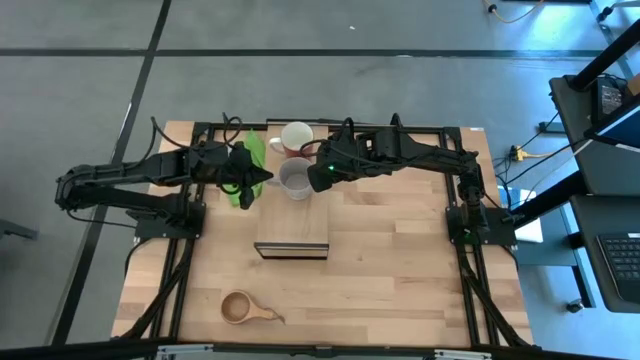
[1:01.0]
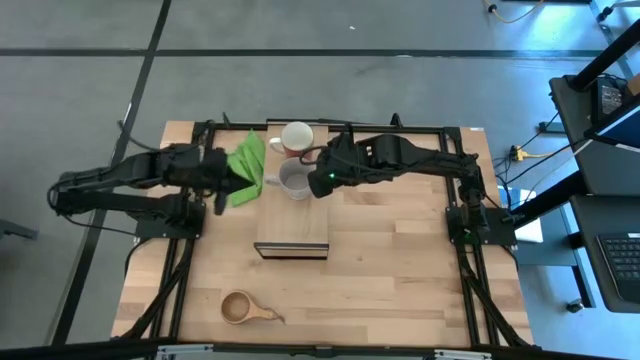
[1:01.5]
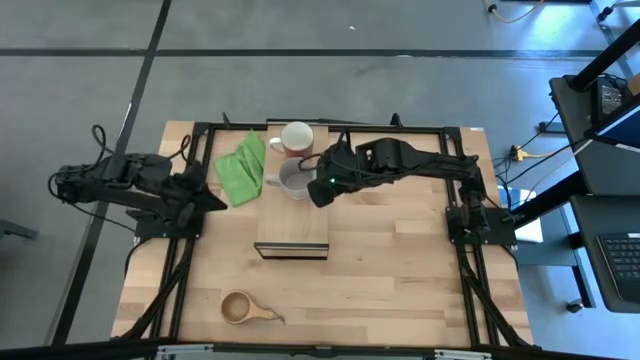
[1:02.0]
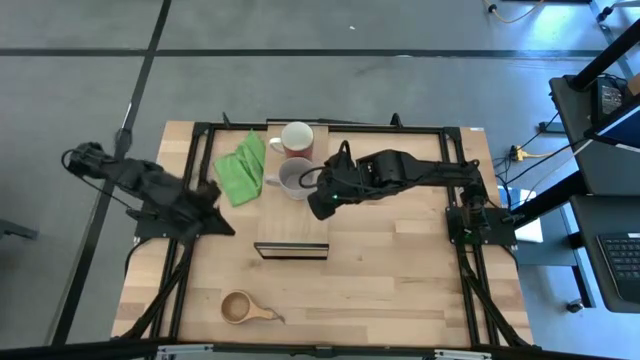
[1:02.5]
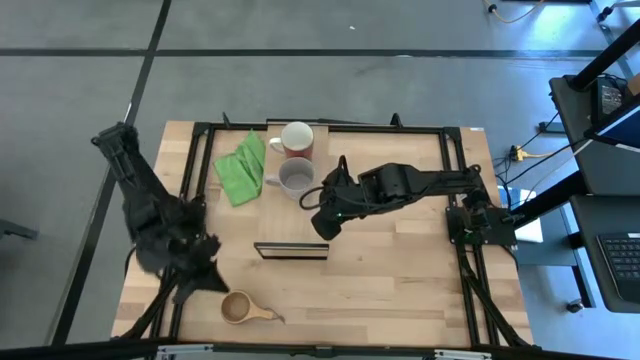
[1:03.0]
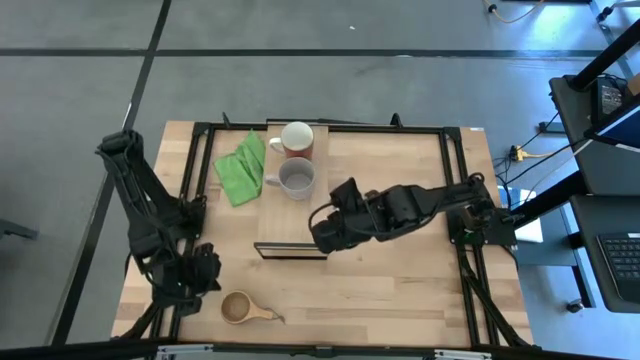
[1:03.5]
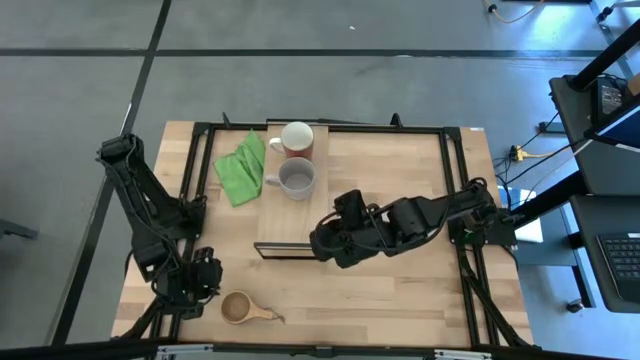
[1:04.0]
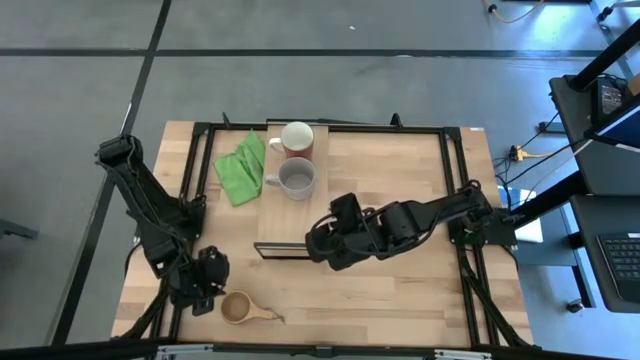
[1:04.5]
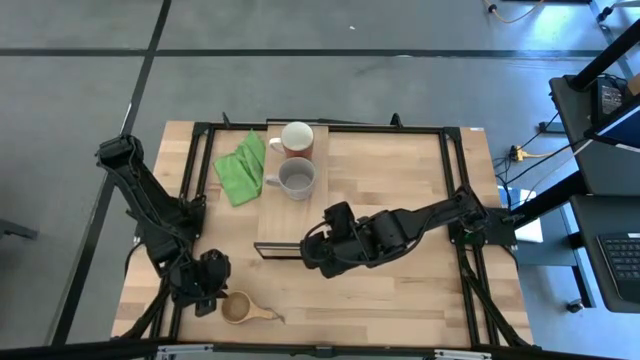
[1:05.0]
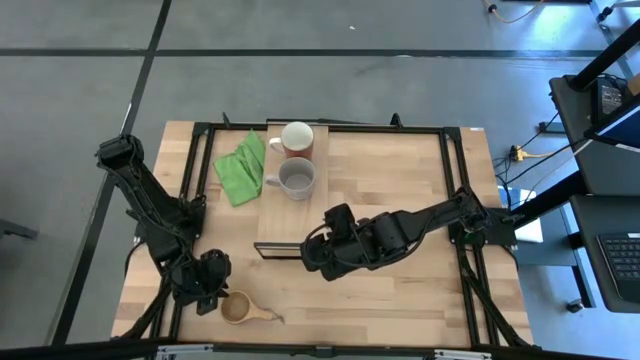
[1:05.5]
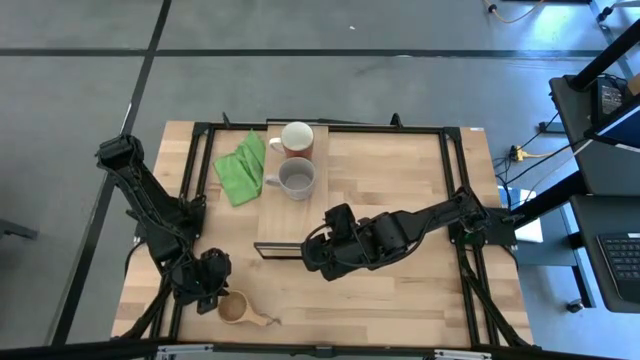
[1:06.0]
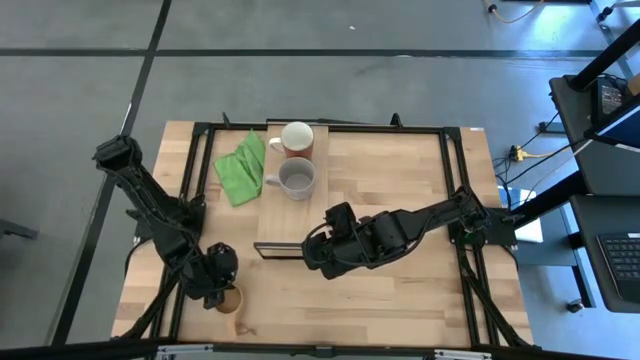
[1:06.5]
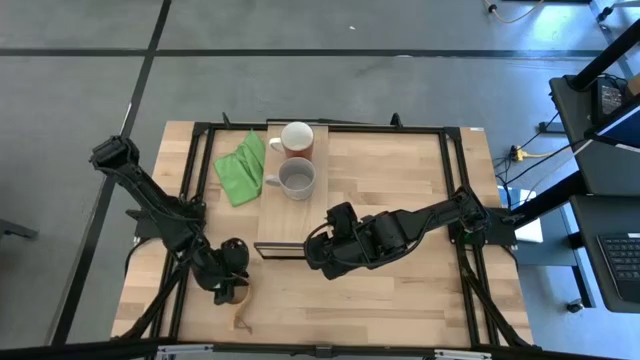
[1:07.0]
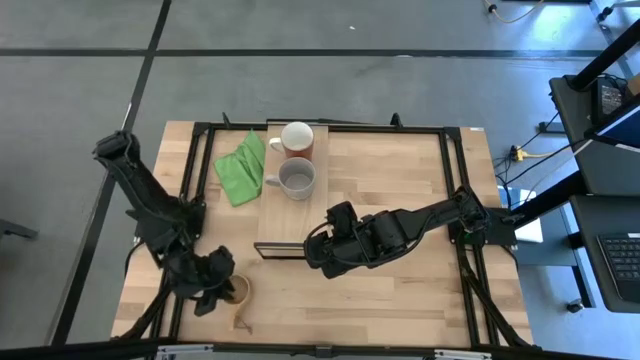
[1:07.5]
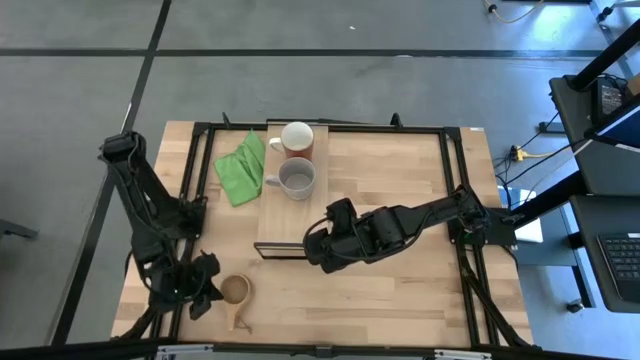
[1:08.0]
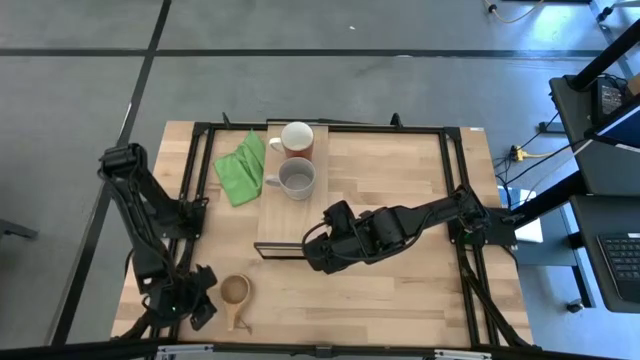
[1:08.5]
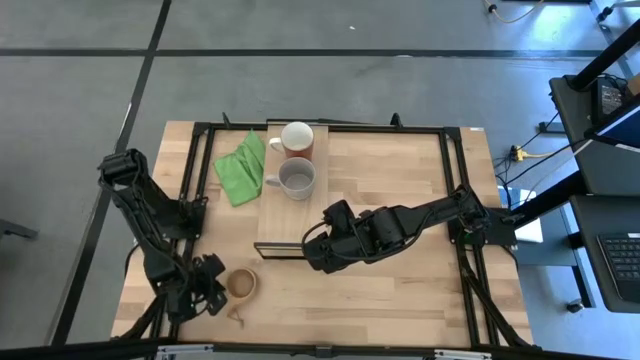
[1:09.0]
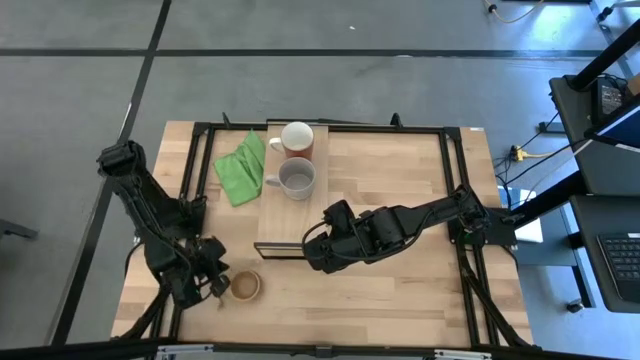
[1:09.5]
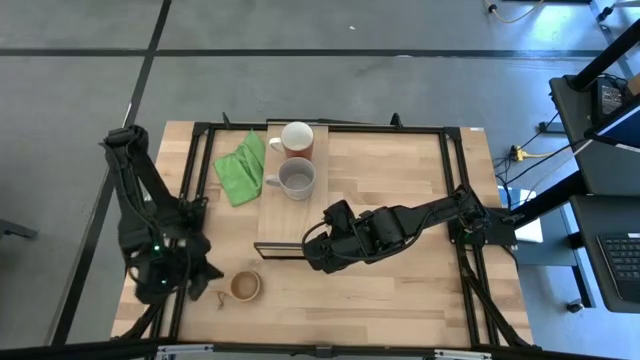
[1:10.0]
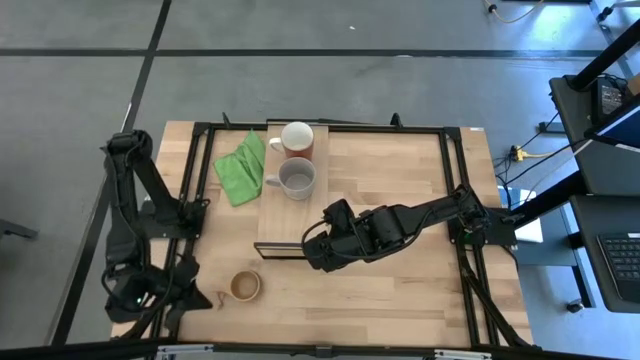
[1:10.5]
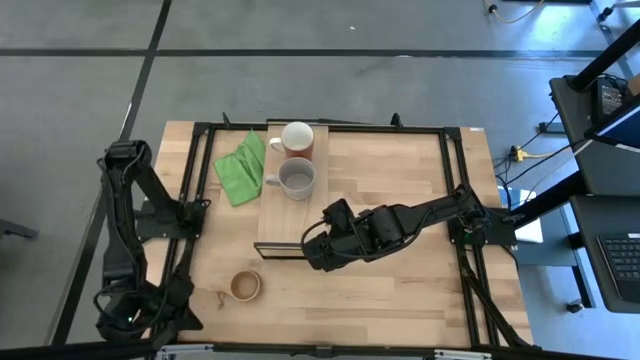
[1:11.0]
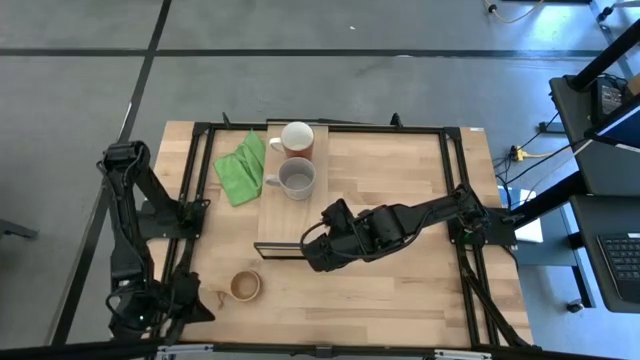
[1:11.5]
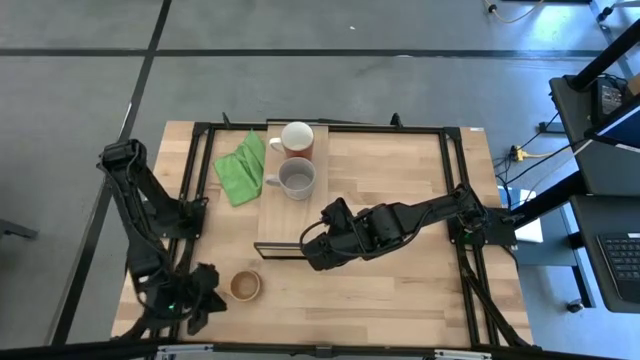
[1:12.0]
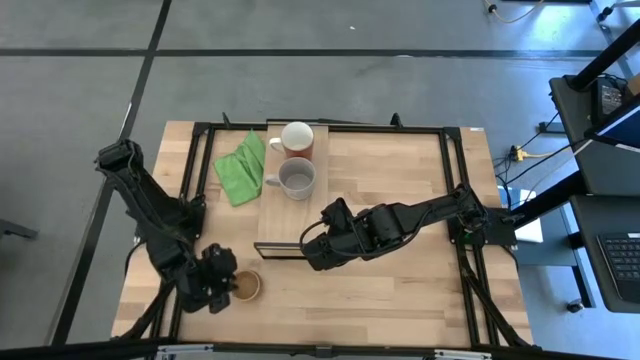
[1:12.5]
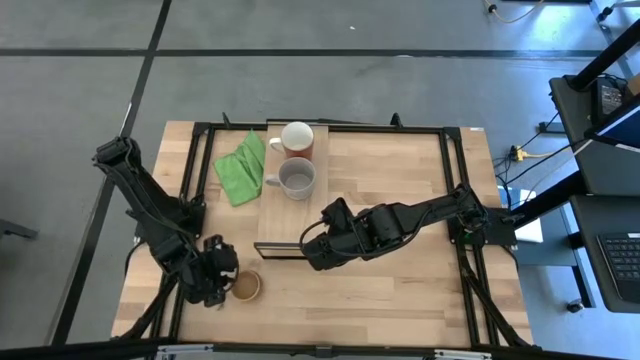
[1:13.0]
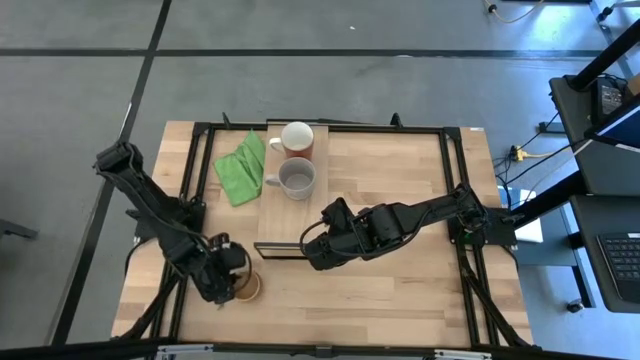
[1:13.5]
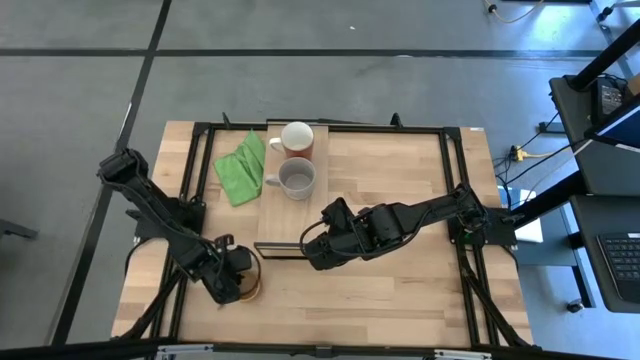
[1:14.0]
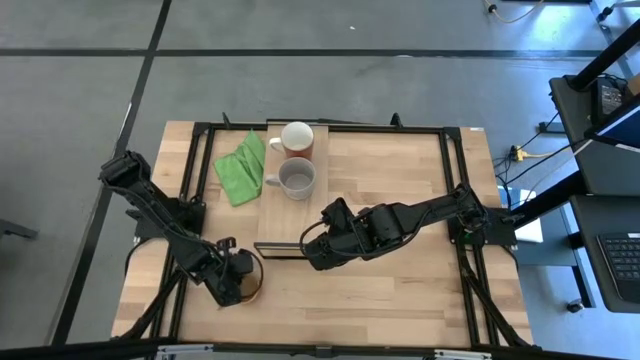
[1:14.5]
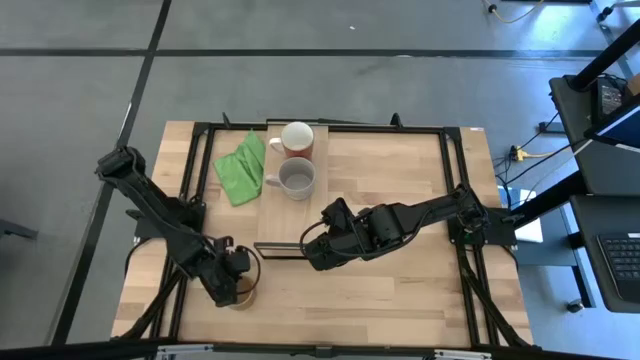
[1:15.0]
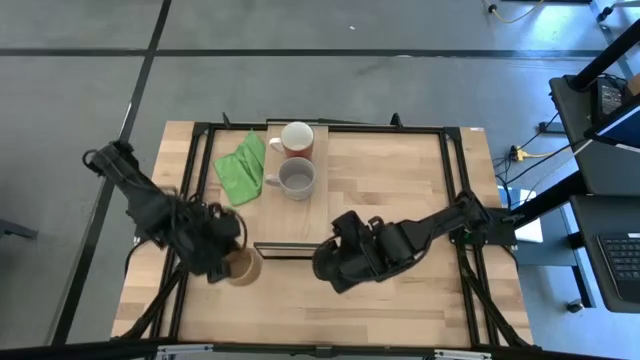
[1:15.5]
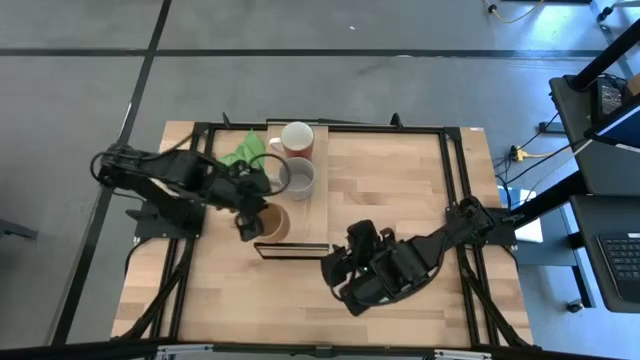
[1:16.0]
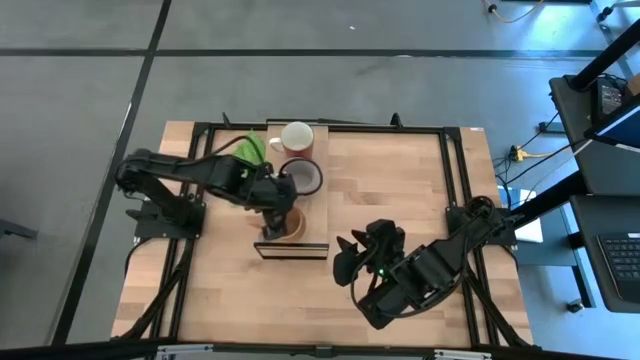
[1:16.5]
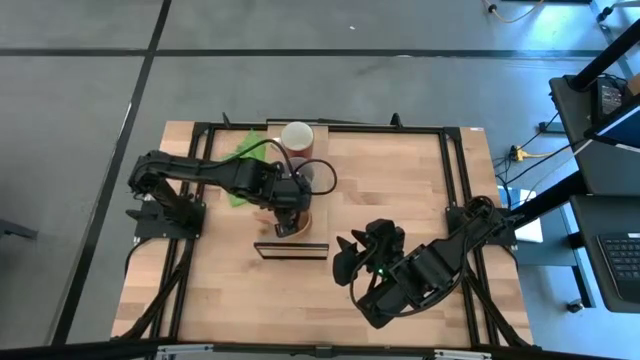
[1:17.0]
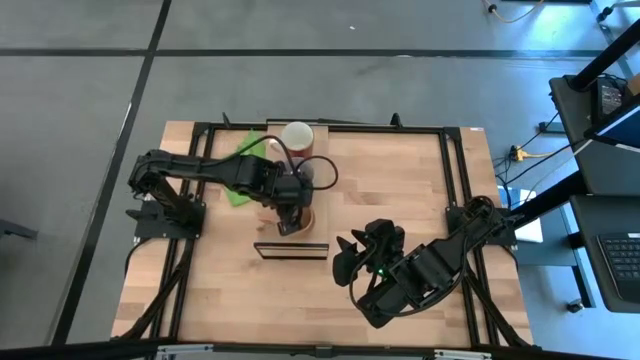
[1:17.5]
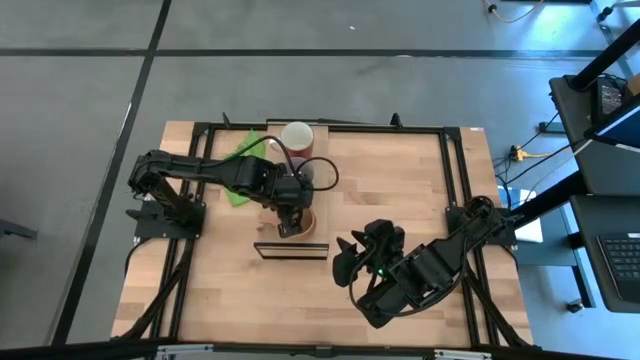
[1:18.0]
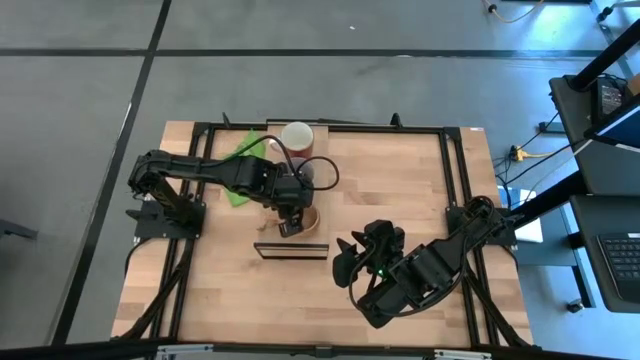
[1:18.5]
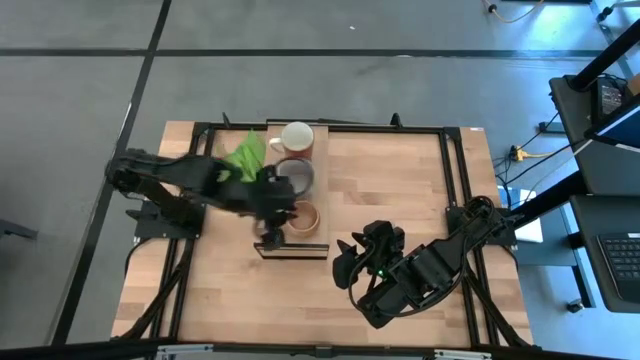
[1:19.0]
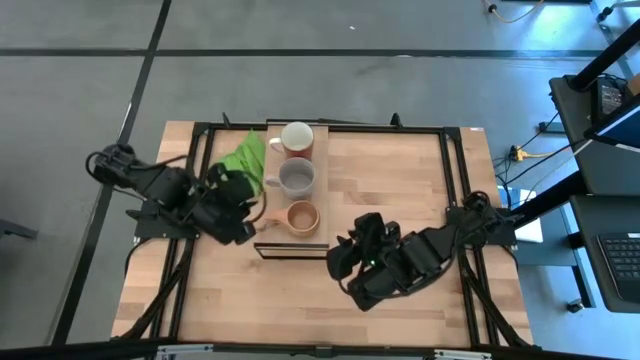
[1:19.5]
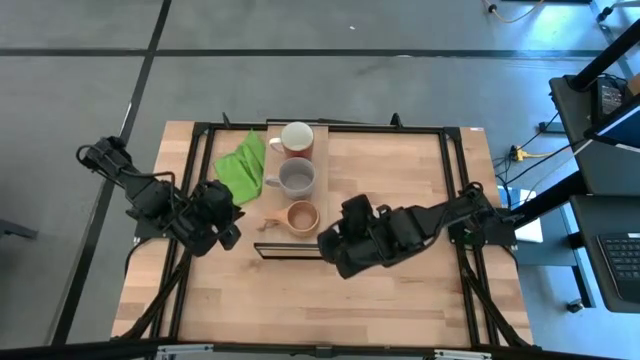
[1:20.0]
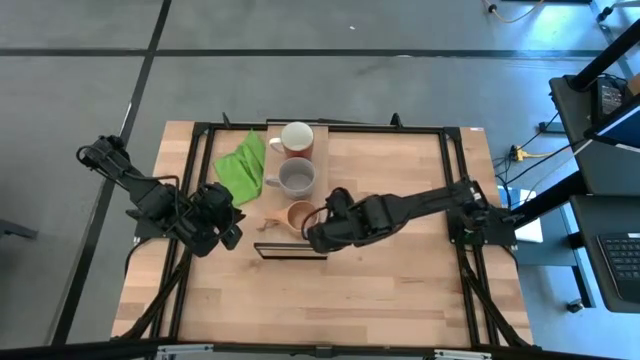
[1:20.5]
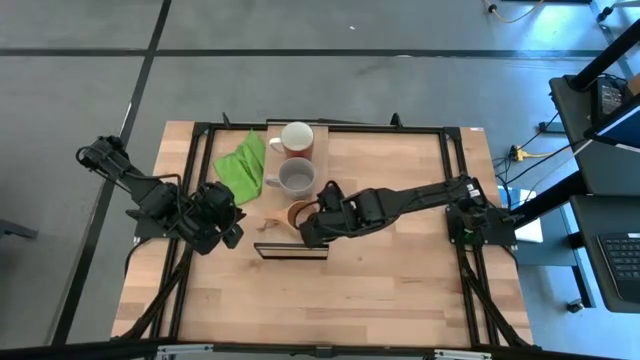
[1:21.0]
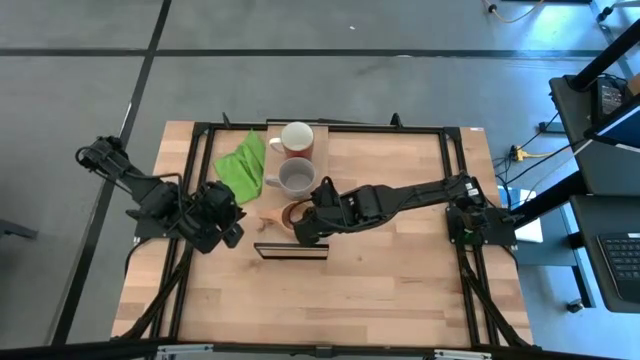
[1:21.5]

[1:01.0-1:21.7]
Task: Stack small to large cups/mugs on shelf
Put the brown mug on the shelf
